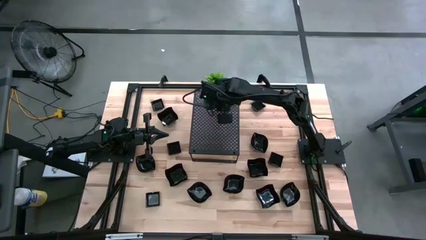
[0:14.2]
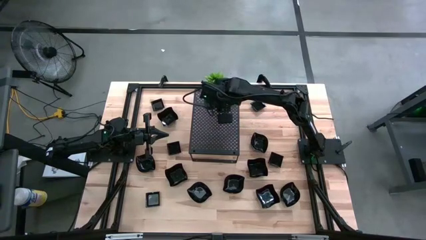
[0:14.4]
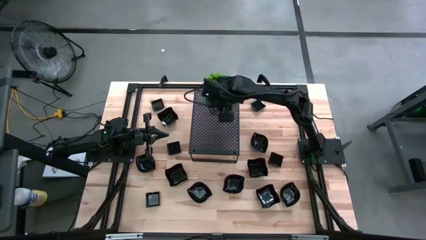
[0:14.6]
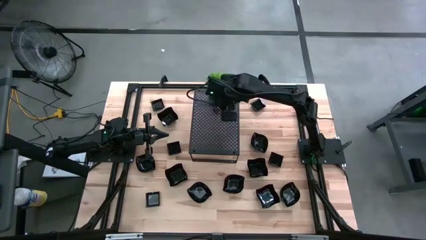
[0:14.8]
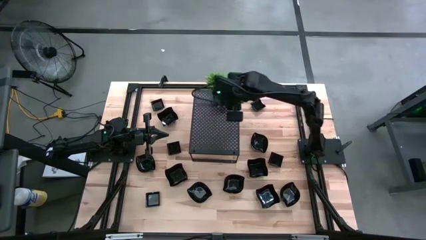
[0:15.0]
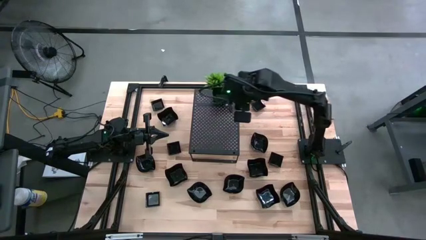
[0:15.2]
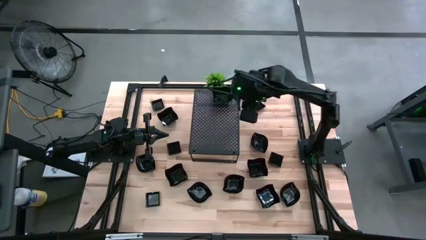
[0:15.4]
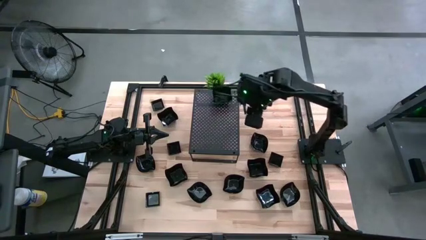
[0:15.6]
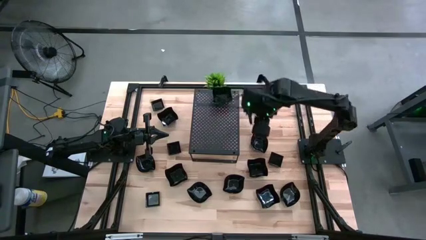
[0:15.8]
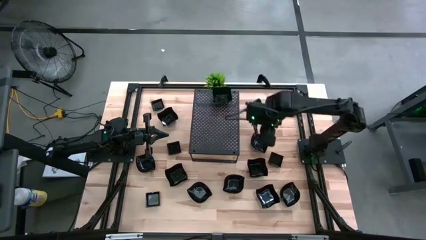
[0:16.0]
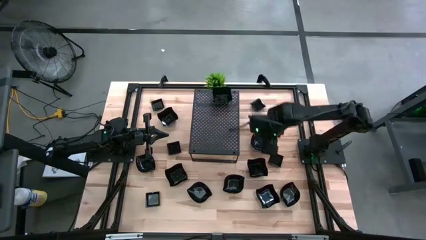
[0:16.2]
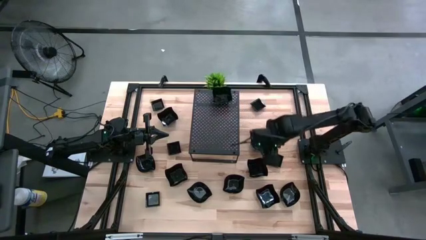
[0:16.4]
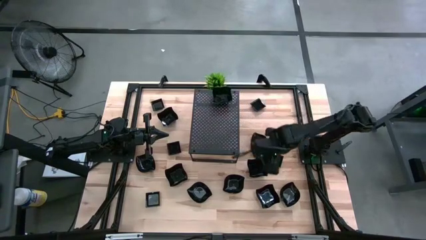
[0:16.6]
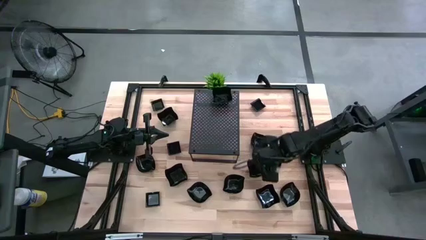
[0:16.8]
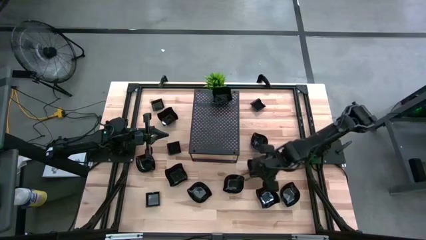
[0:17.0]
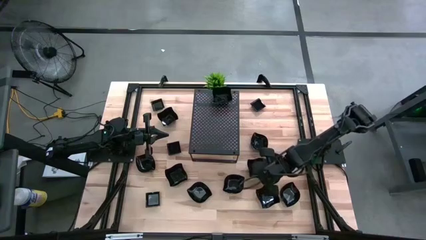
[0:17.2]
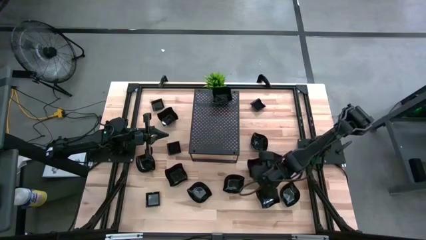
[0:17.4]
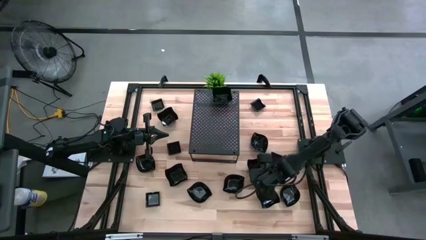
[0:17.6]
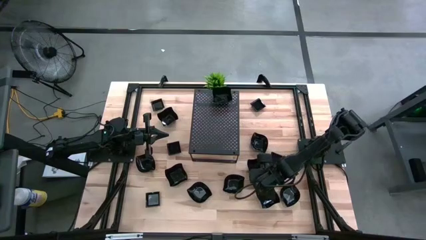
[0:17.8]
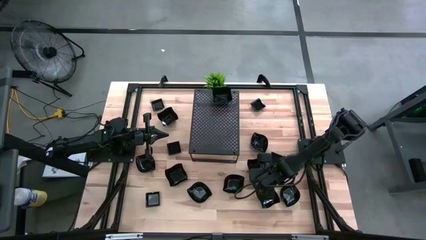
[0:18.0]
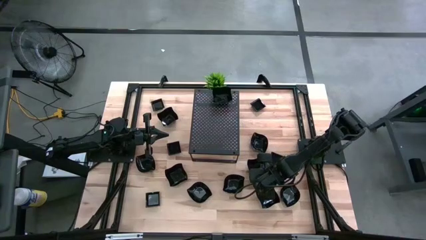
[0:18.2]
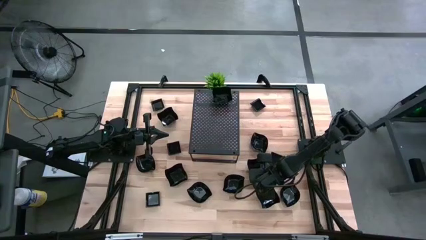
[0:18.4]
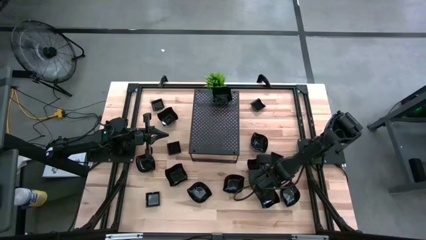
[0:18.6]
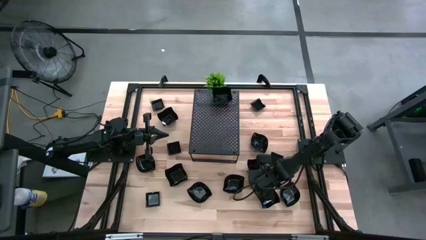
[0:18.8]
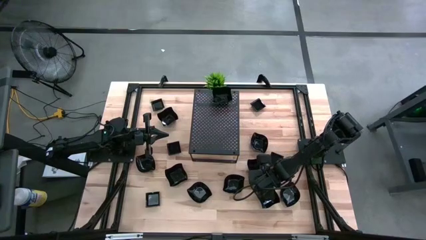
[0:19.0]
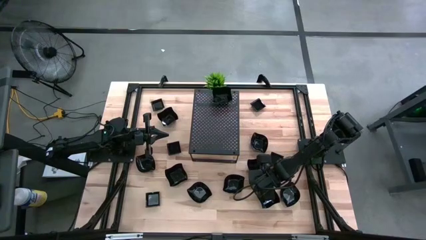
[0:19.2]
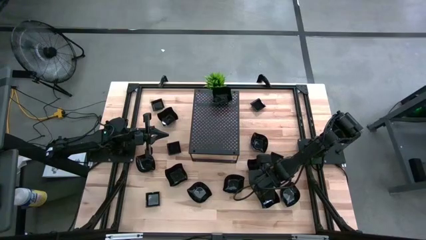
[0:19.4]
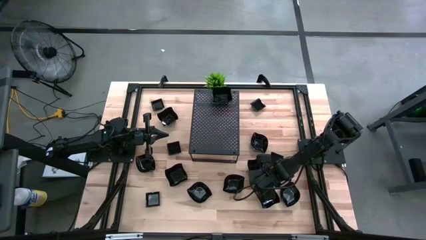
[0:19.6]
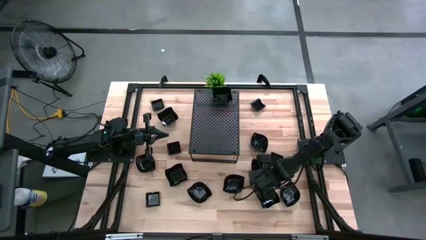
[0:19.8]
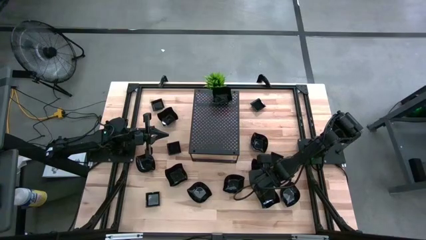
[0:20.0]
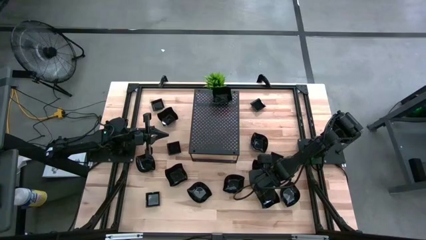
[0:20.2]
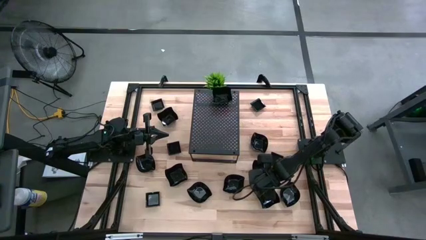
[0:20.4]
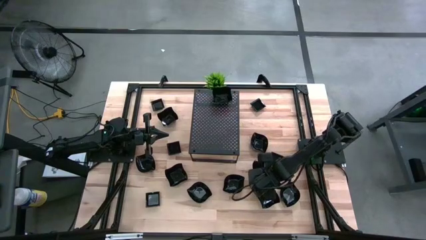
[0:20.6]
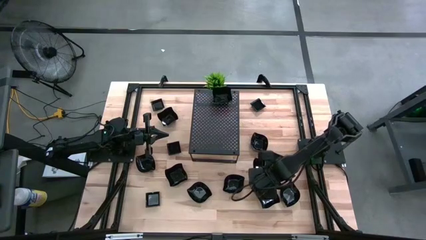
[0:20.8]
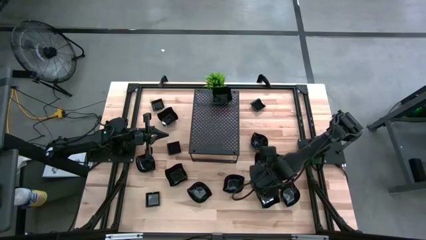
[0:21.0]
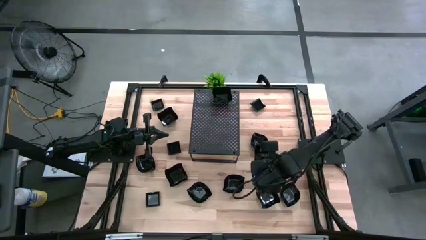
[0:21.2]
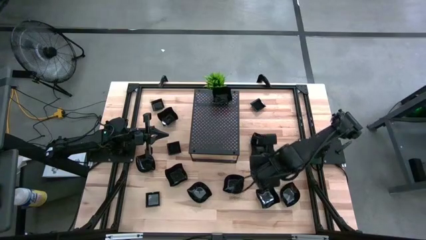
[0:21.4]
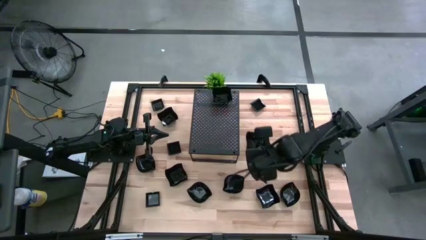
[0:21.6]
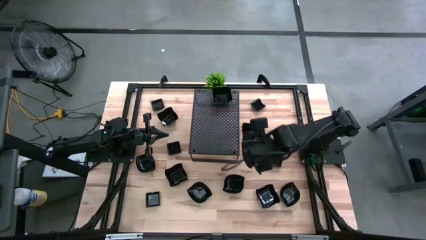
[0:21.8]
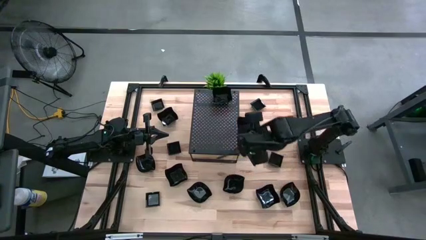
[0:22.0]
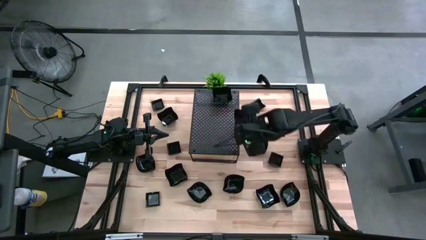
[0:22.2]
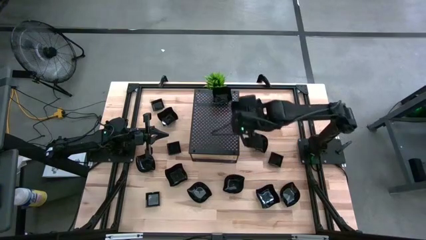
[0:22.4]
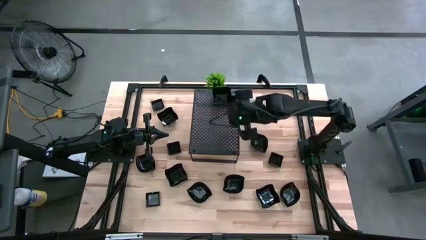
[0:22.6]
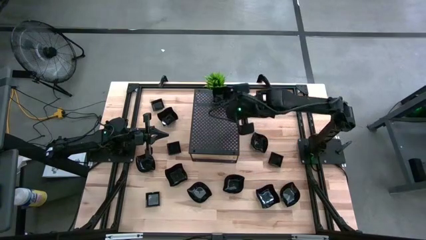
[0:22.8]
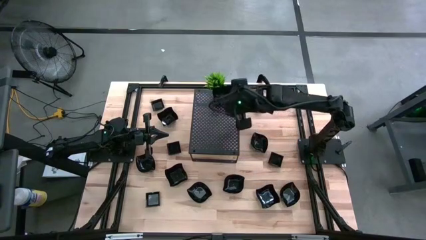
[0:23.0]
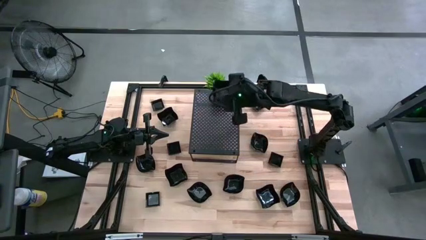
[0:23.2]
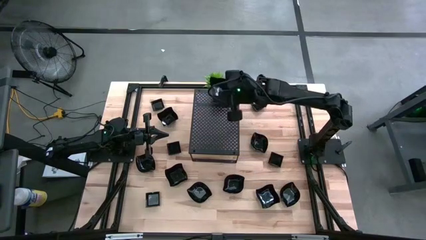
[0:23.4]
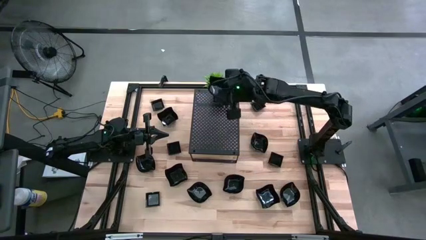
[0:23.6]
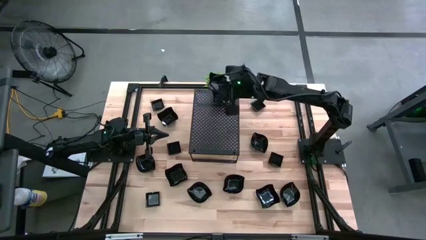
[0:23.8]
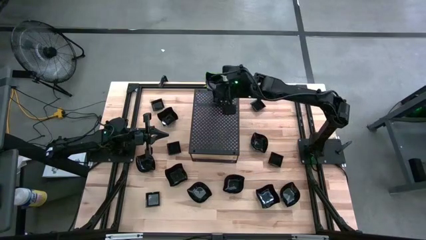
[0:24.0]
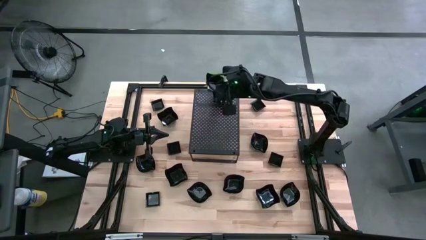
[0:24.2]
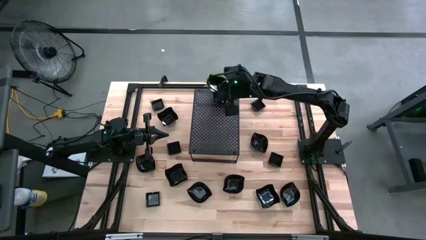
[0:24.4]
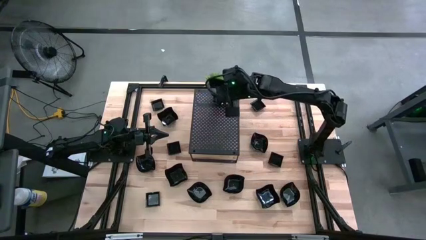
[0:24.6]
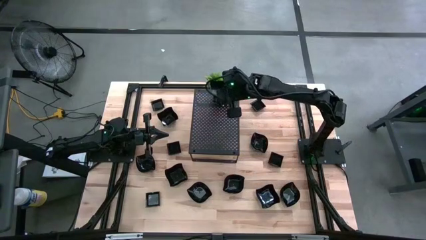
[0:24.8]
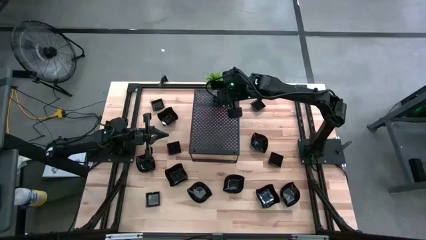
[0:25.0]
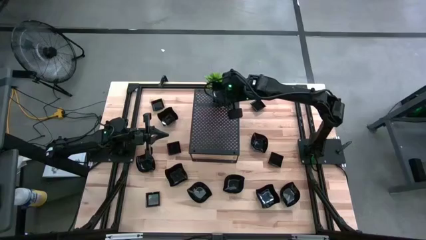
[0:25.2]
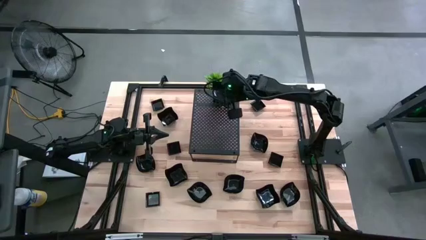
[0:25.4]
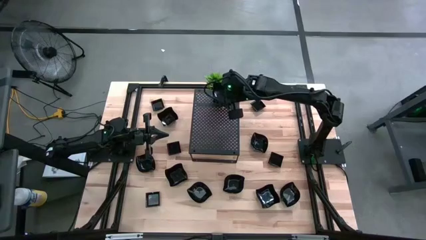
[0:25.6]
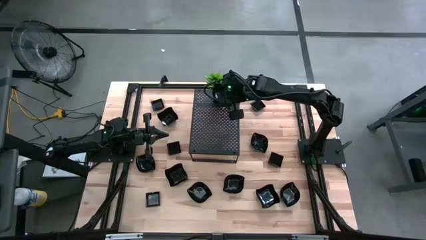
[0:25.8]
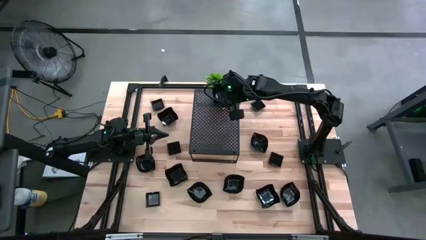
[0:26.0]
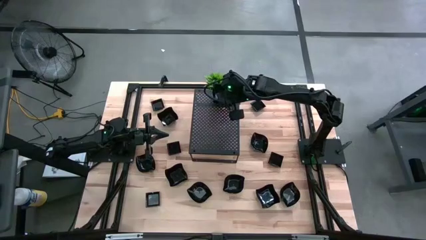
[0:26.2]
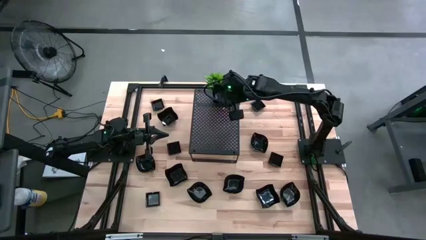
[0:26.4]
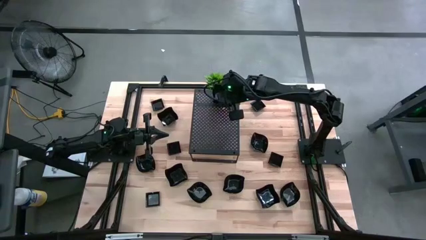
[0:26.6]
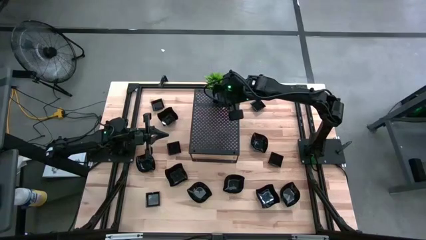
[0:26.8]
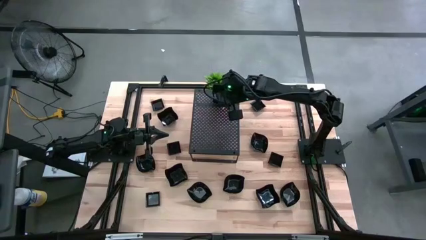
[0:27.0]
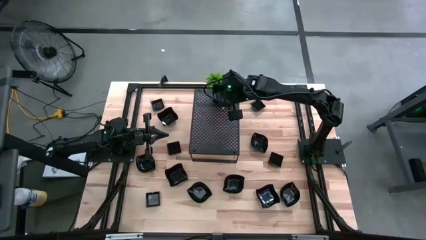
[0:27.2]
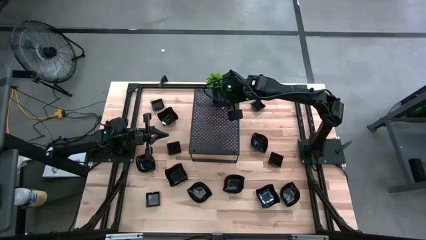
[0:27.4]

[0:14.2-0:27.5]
Task: Pick & Place Mini shaped plates
Stack the distorted square plate on top of the distorted square plate on the shelf
